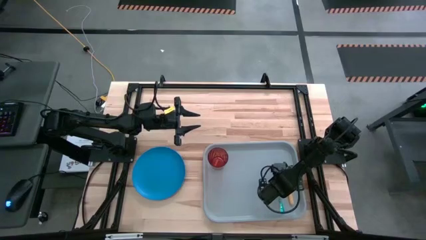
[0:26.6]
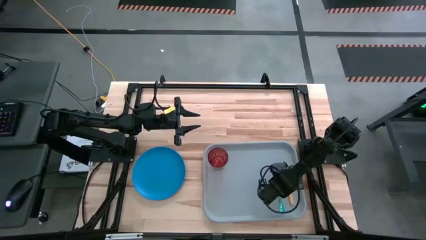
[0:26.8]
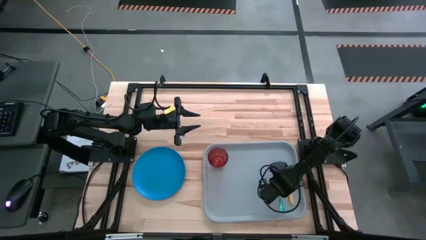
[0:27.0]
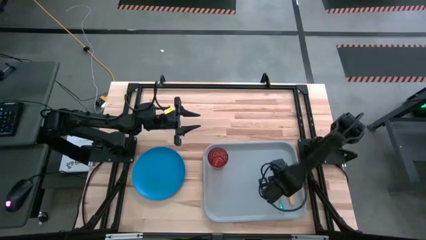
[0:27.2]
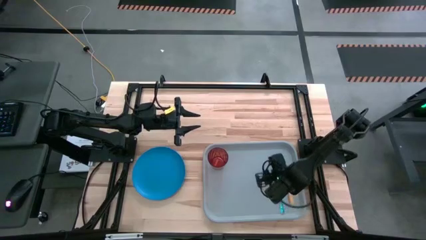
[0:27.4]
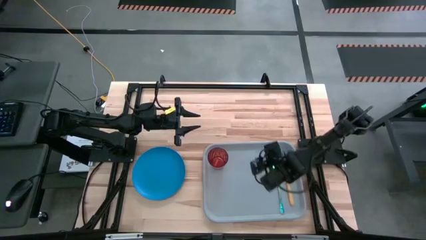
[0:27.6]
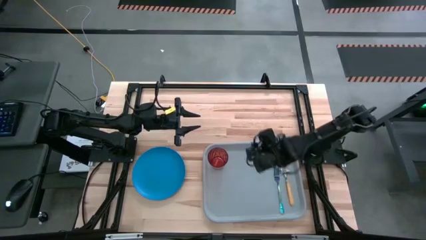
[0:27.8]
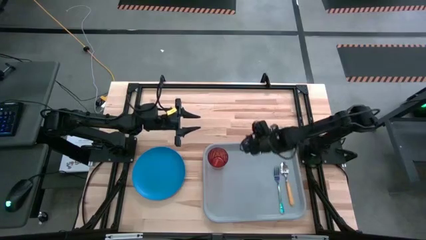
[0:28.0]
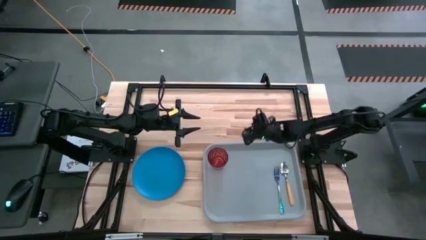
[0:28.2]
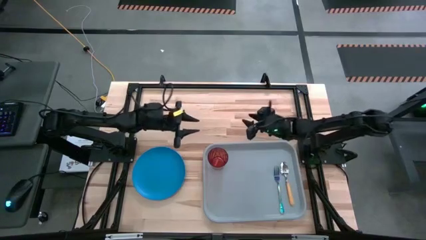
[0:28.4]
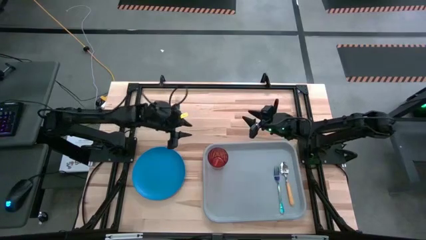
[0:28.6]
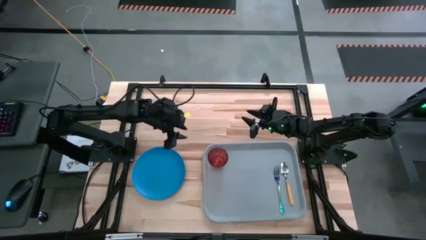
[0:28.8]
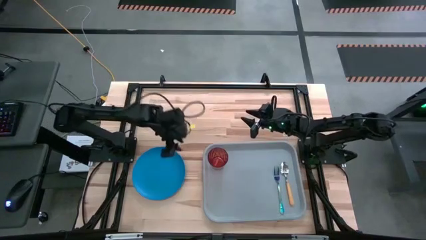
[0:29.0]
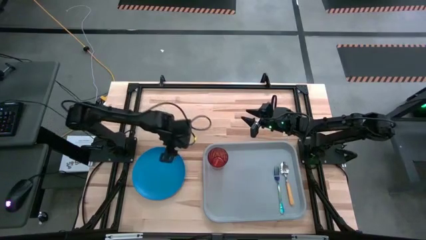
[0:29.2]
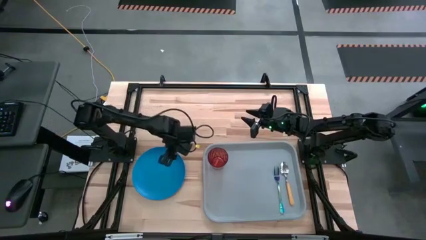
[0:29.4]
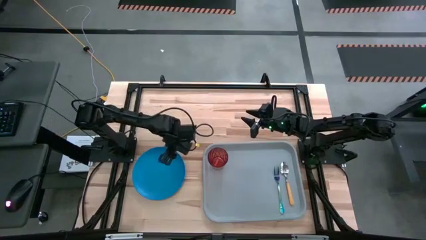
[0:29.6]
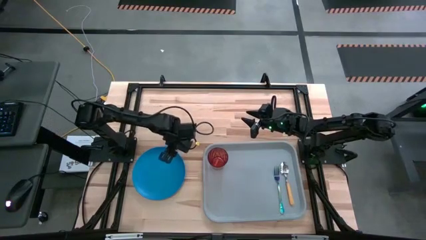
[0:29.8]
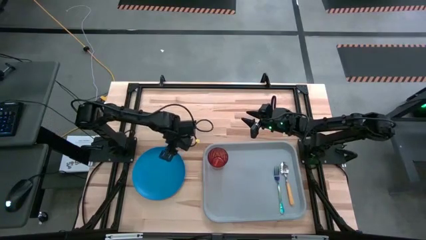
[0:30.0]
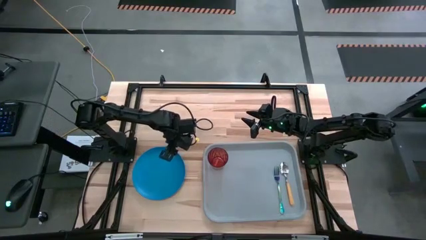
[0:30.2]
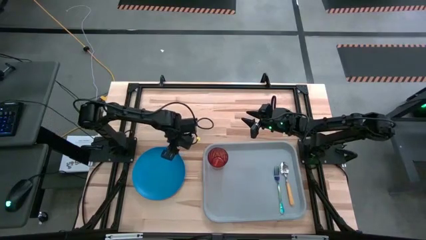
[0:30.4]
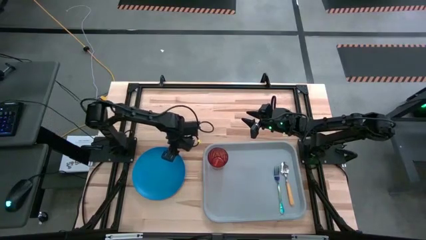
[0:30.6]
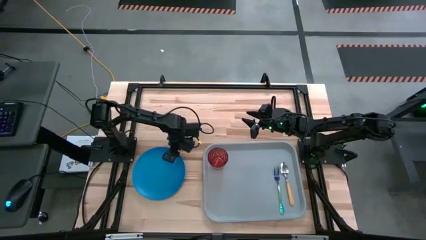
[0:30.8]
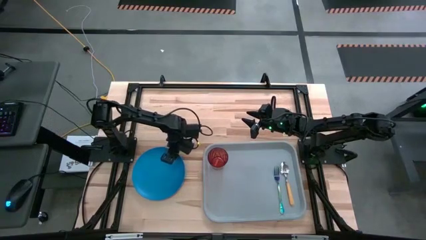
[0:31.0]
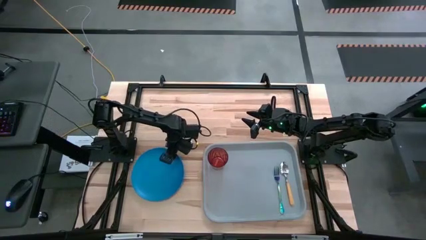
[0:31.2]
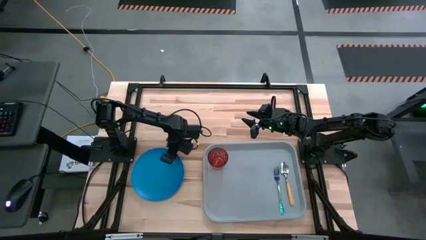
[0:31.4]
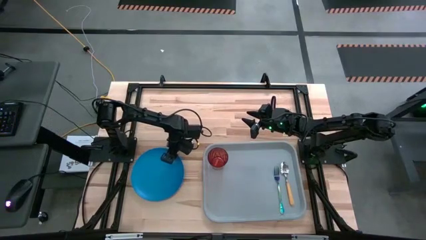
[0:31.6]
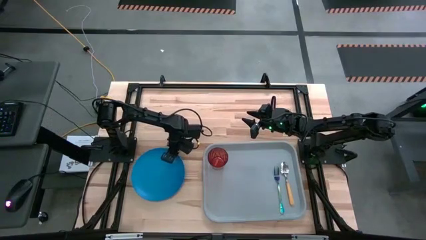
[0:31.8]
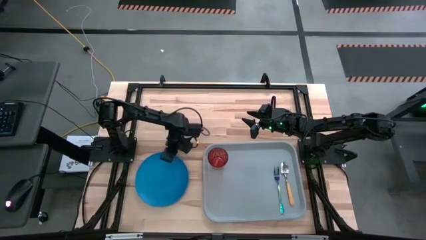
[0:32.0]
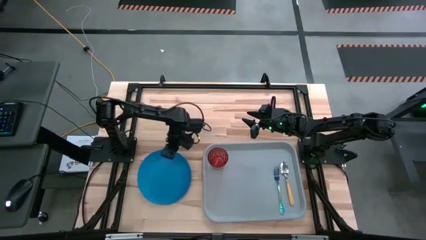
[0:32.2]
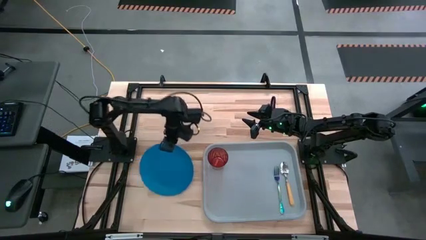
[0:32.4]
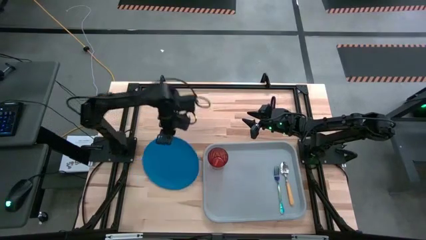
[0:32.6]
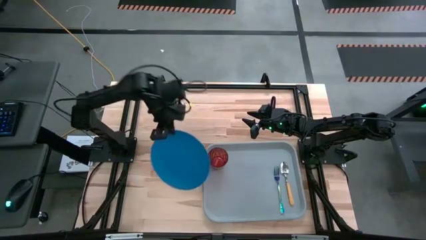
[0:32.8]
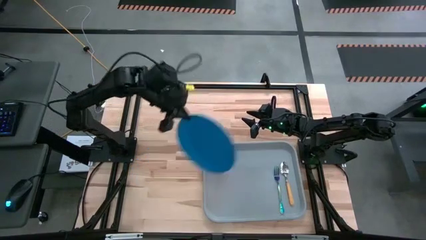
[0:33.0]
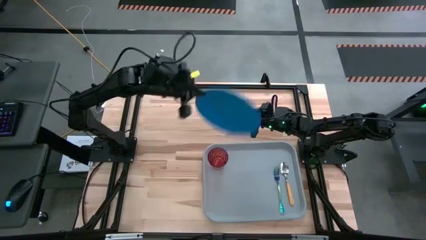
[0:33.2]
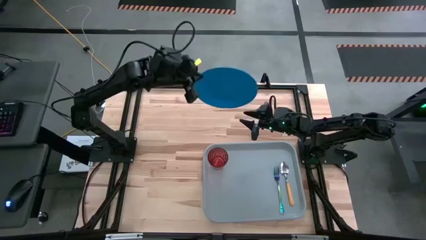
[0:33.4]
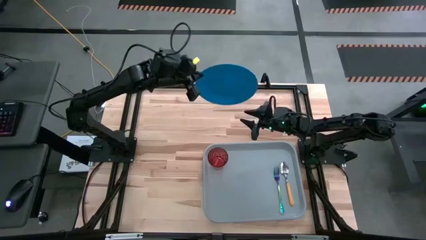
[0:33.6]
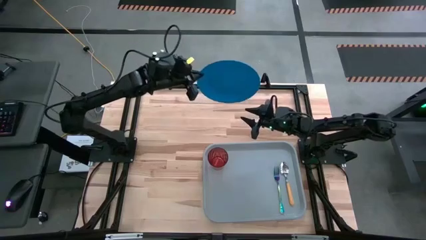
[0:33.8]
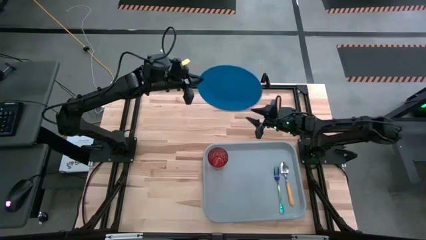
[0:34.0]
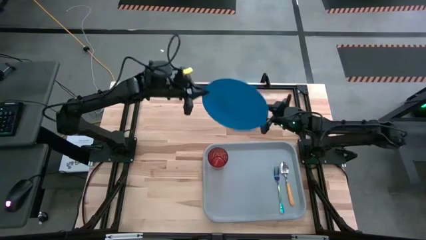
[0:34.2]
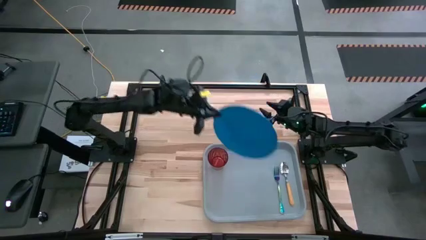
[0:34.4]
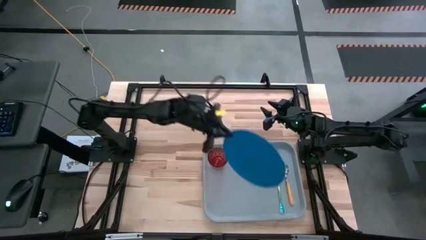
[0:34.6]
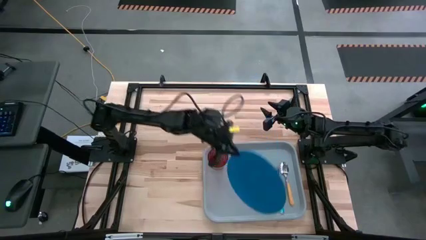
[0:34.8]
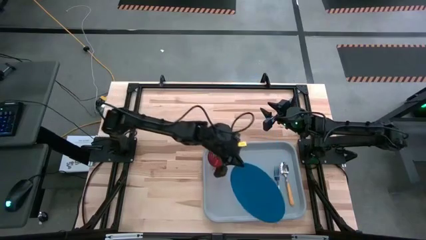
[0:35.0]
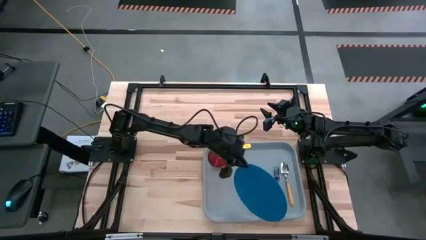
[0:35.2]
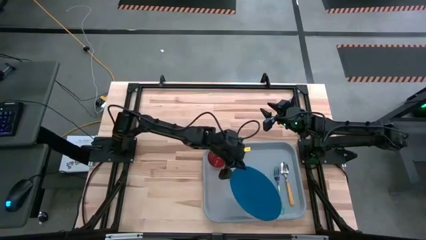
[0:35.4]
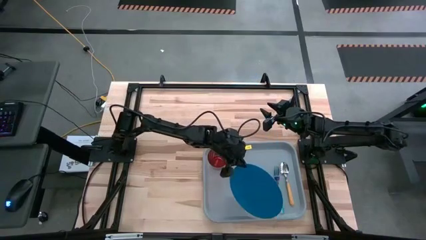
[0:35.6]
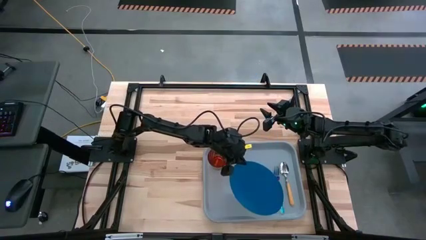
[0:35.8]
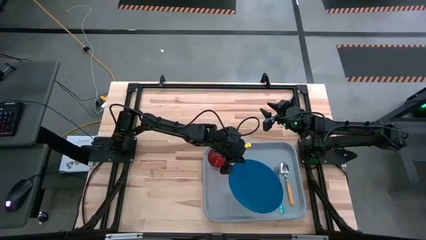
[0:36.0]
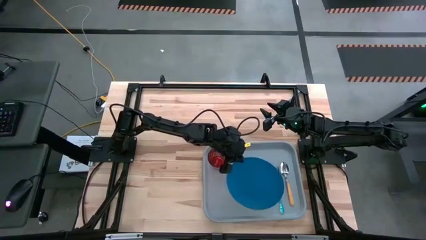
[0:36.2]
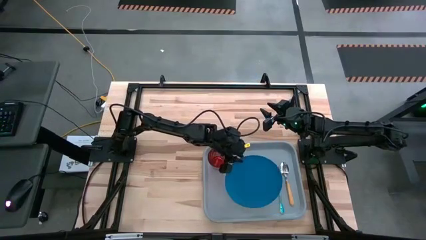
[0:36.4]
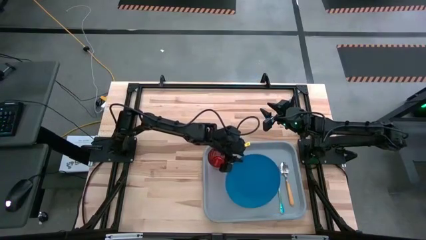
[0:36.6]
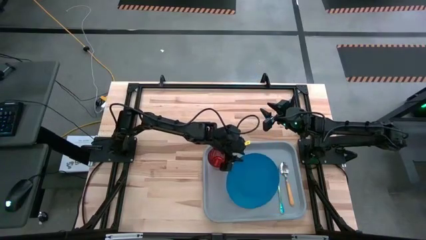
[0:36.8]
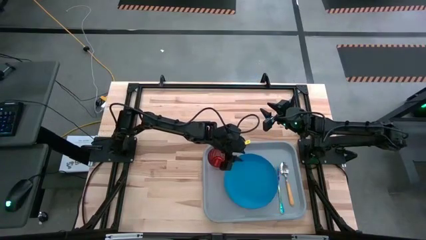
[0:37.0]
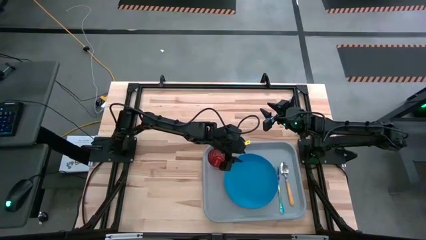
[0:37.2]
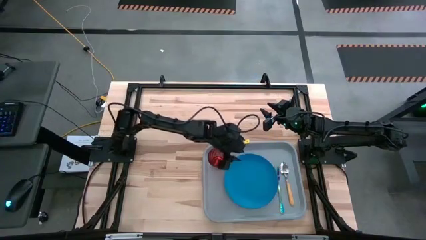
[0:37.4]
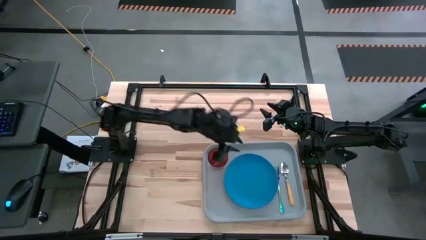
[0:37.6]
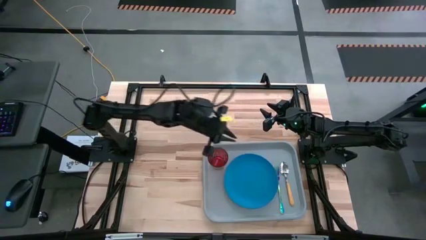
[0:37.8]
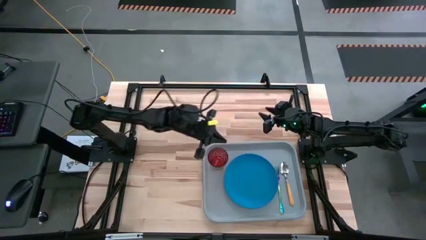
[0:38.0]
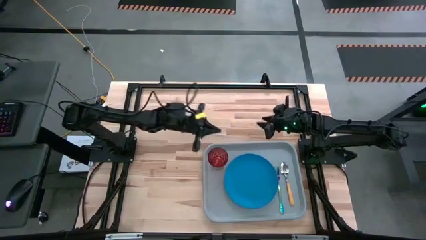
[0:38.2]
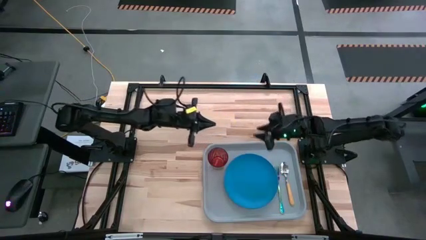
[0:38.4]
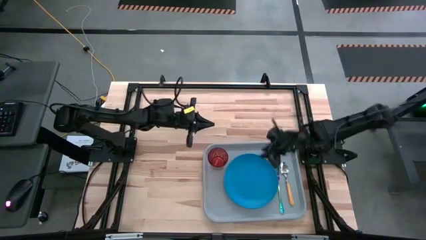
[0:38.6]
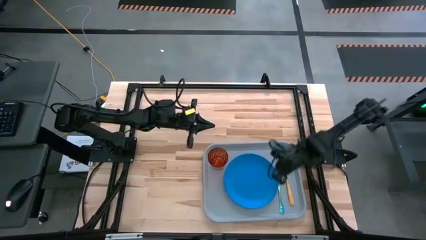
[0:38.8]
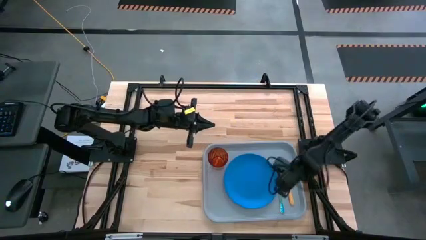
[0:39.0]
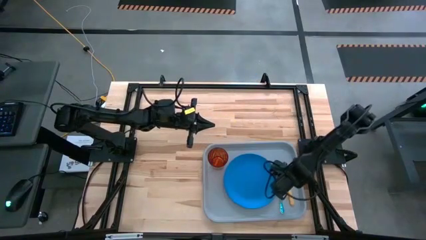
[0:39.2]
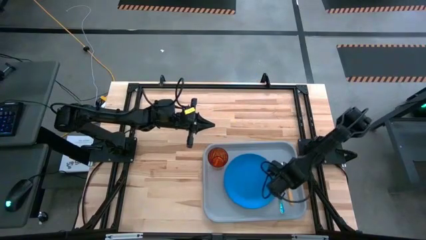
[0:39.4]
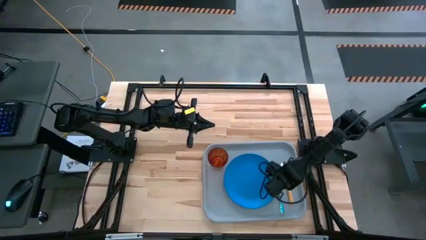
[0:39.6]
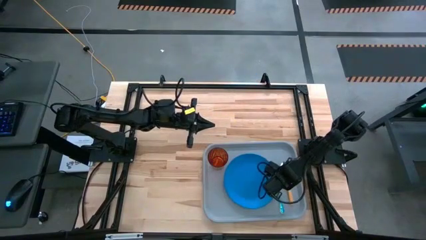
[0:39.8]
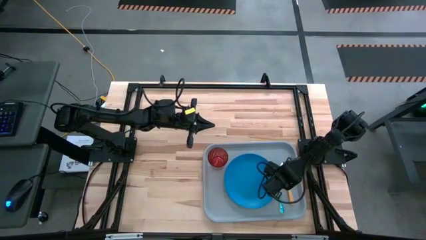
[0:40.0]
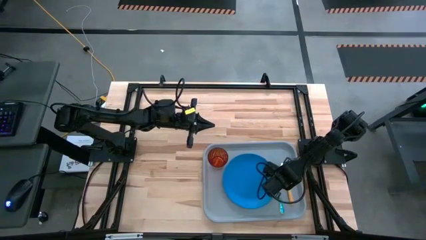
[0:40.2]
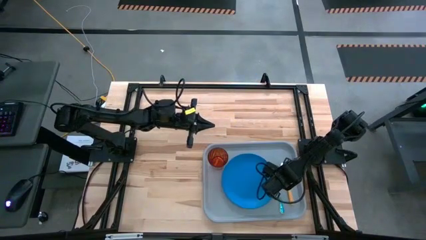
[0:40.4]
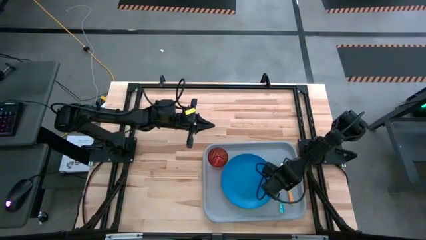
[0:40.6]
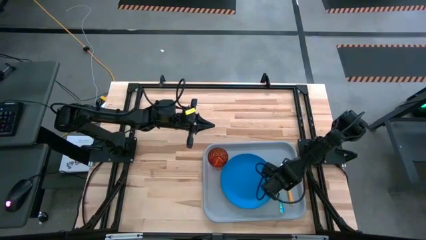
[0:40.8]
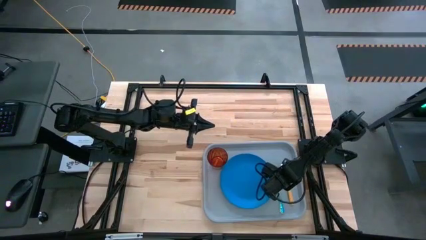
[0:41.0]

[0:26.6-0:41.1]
Task: Pick and place plate/cup/fork/spoon on tray
Put the blue plate on the gray tray to the left of the blue fork

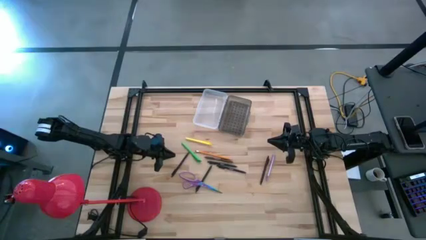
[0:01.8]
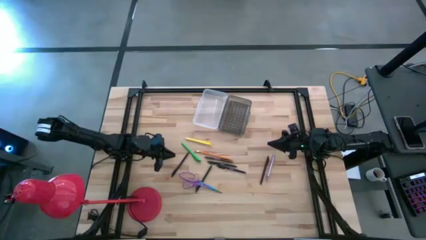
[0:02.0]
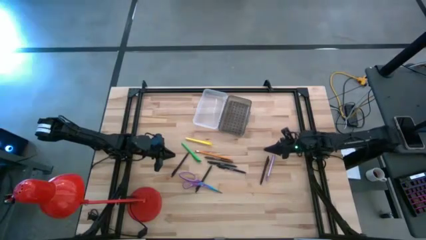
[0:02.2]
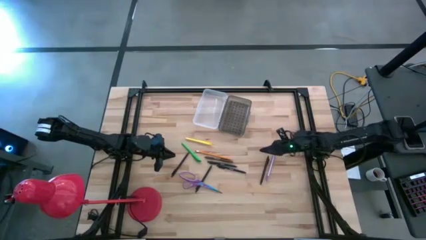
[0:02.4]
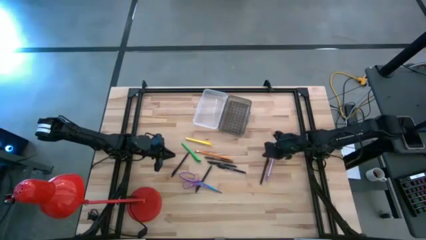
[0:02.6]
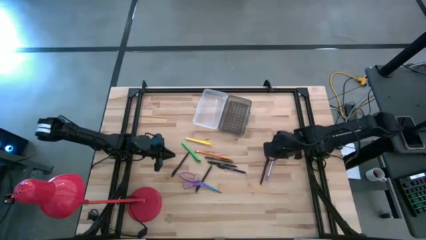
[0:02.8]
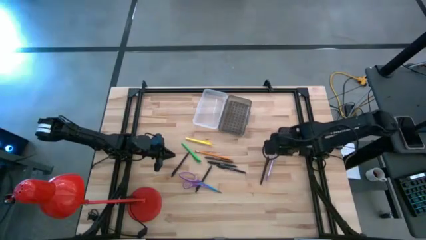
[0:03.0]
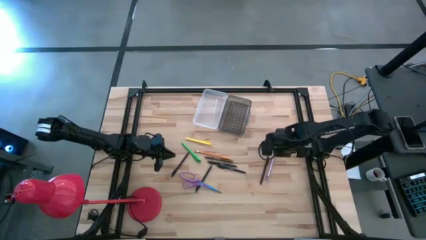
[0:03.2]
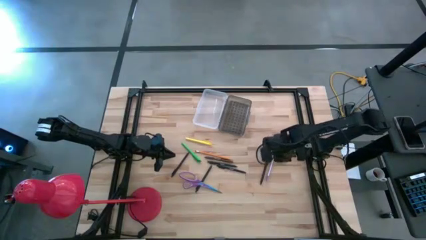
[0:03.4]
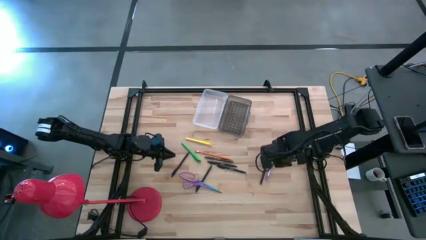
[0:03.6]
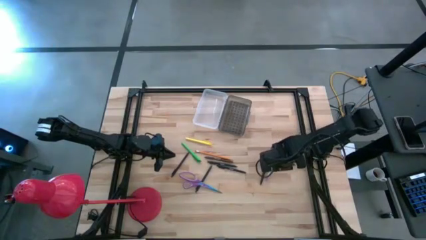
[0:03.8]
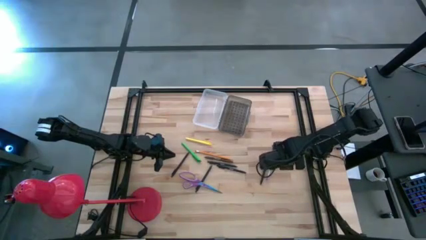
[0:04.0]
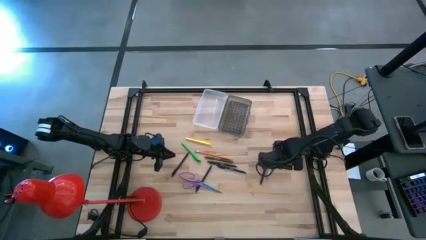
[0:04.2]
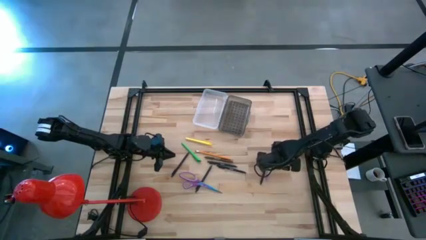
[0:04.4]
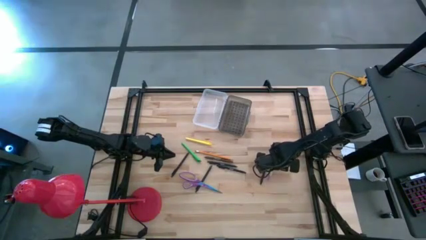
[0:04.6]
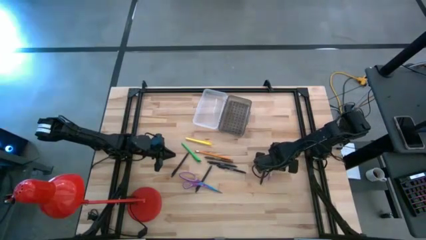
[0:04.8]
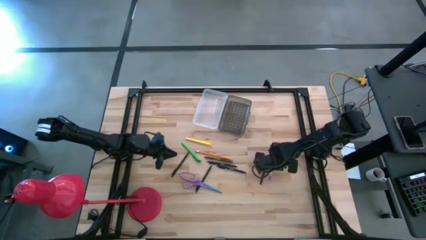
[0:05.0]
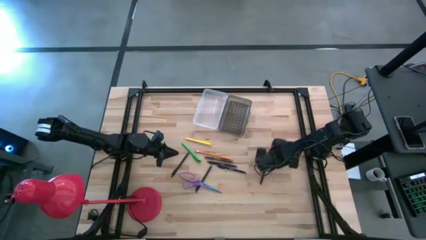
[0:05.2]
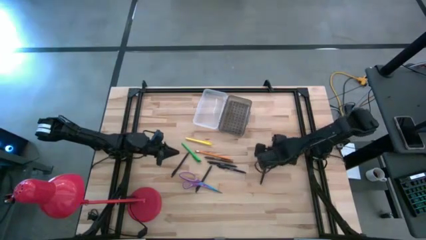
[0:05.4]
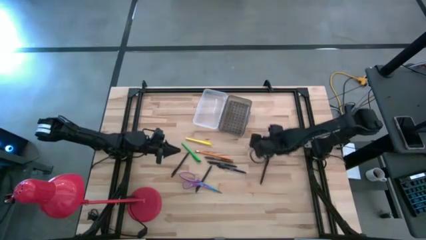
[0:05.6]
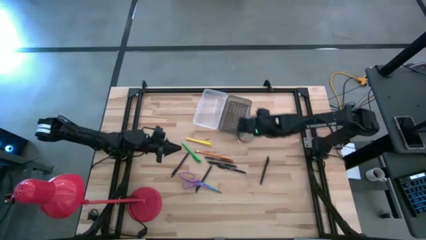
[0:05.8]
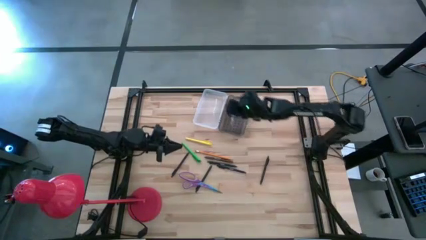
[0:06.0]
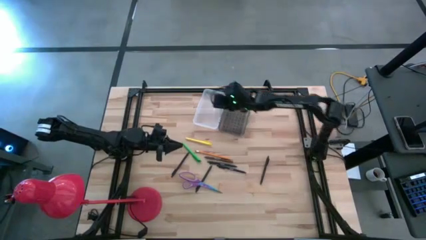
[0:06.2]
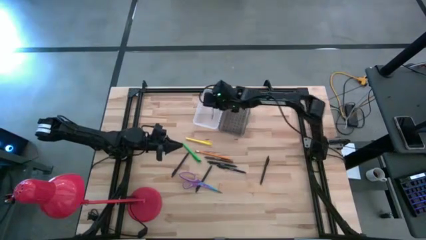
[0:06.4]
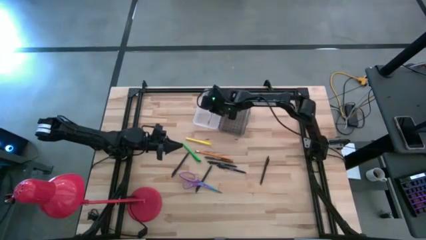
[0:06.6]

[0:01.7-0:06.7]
Task: Pick & place school supplies into a supply box
Put the purple pen into the transparent supply box
